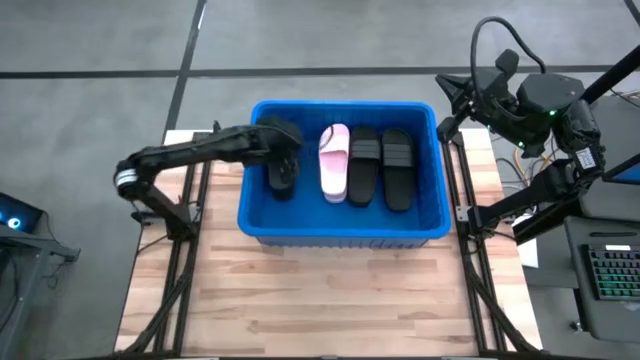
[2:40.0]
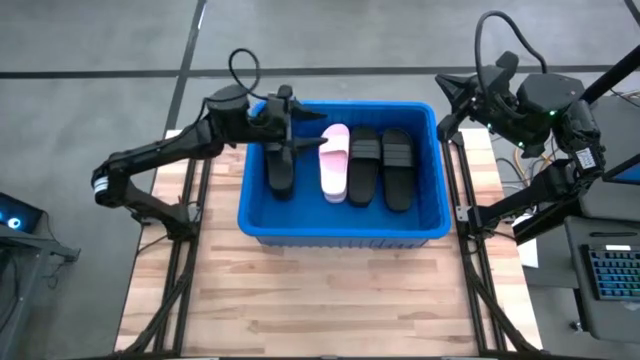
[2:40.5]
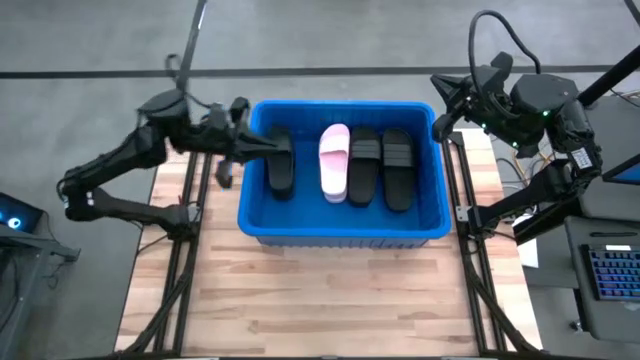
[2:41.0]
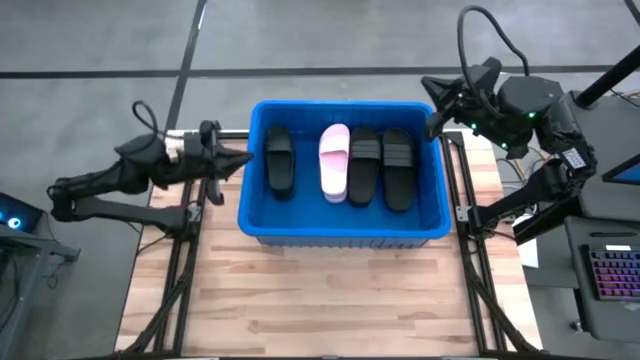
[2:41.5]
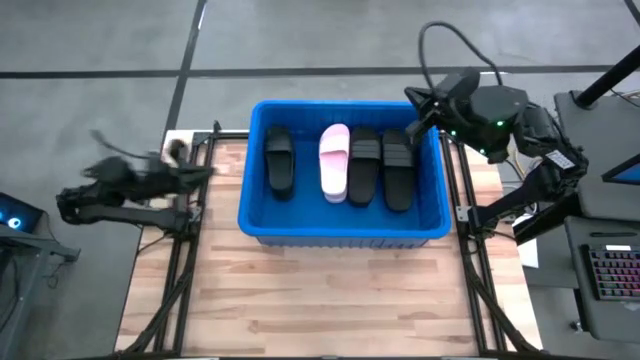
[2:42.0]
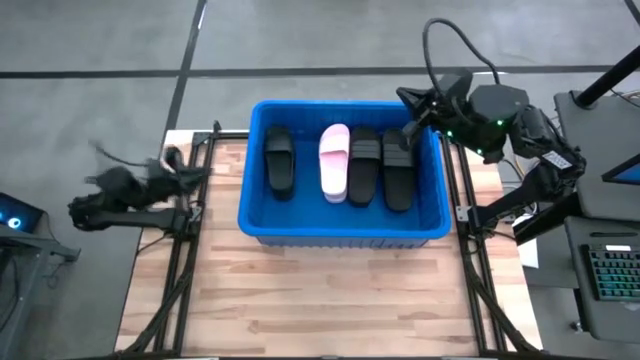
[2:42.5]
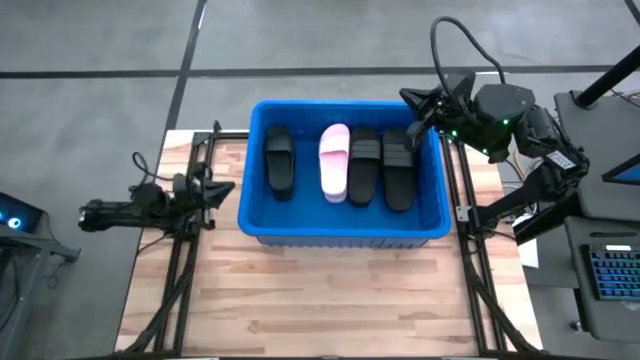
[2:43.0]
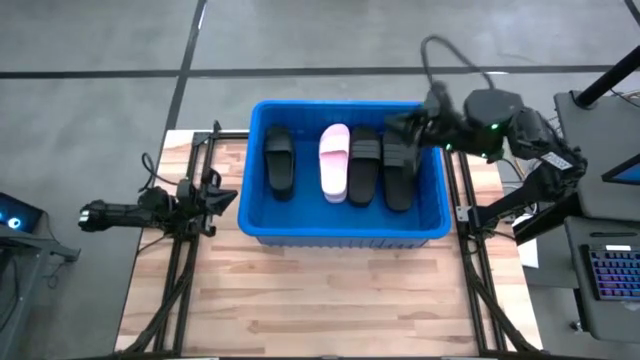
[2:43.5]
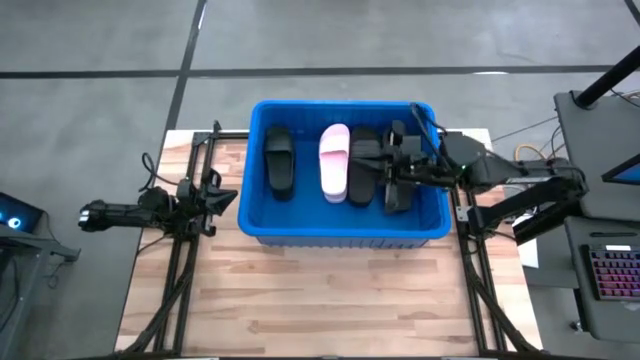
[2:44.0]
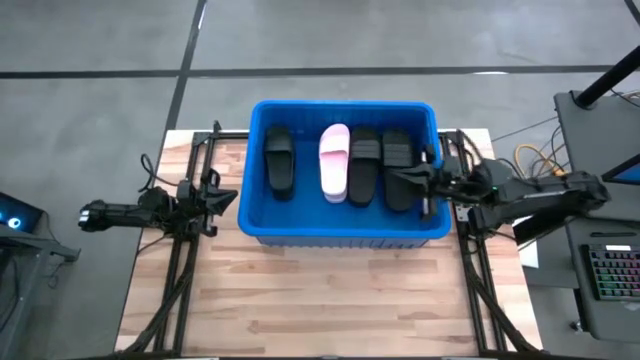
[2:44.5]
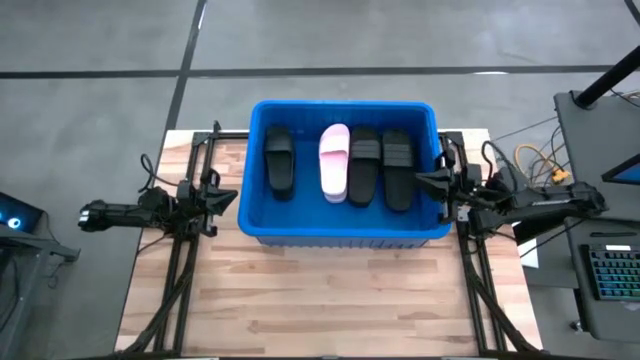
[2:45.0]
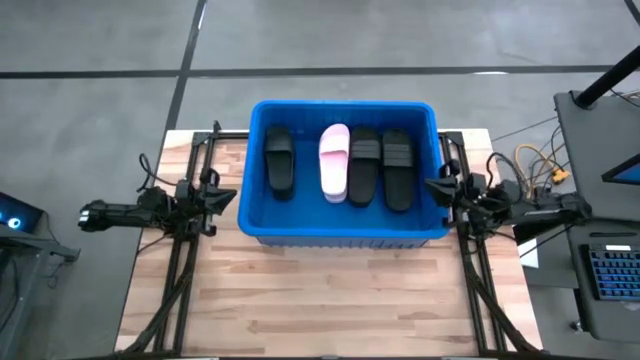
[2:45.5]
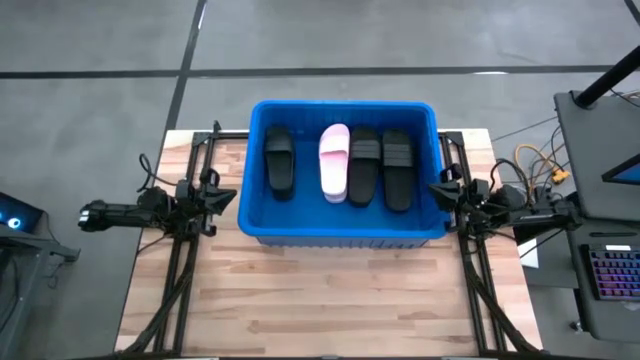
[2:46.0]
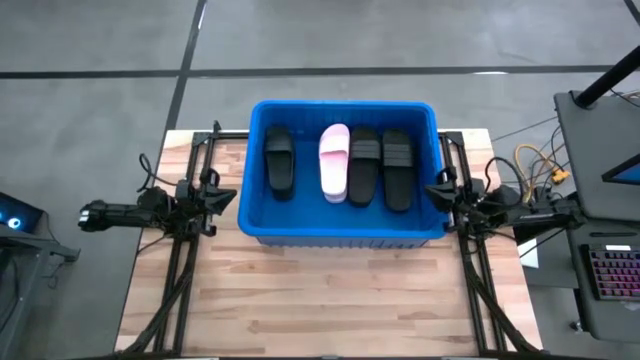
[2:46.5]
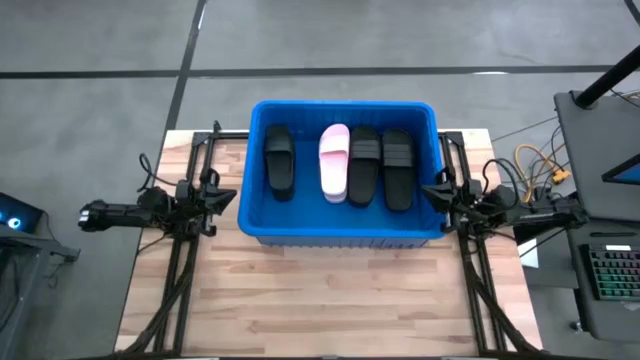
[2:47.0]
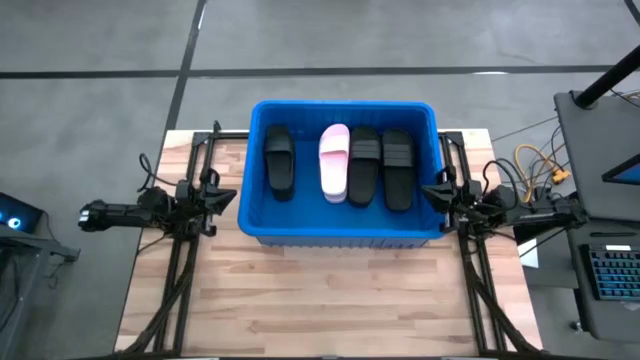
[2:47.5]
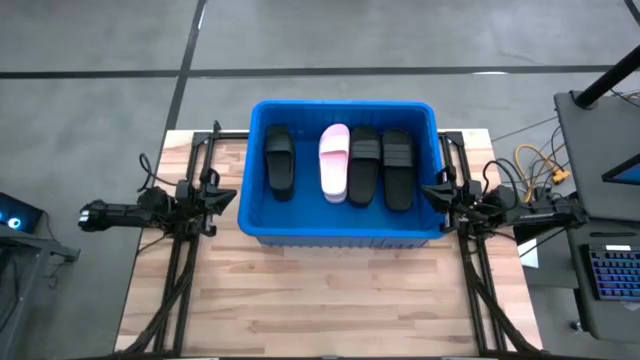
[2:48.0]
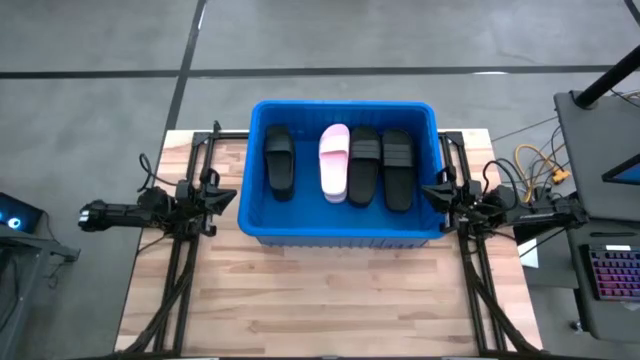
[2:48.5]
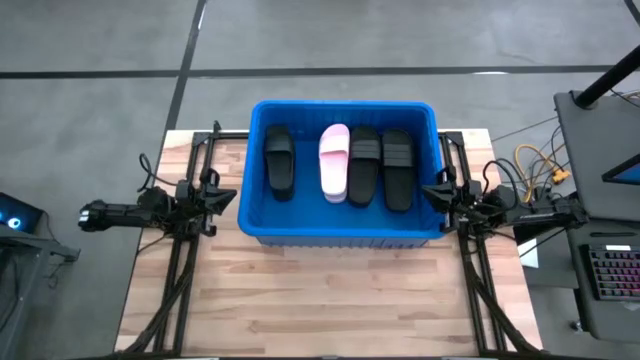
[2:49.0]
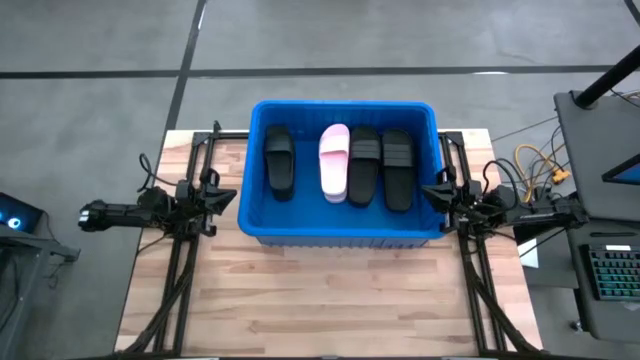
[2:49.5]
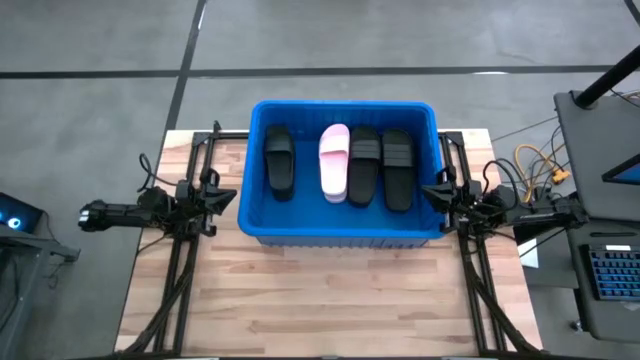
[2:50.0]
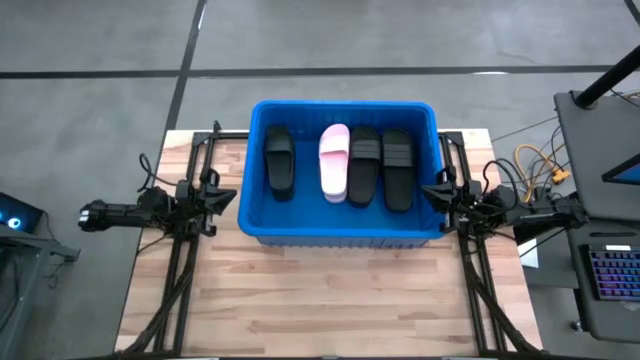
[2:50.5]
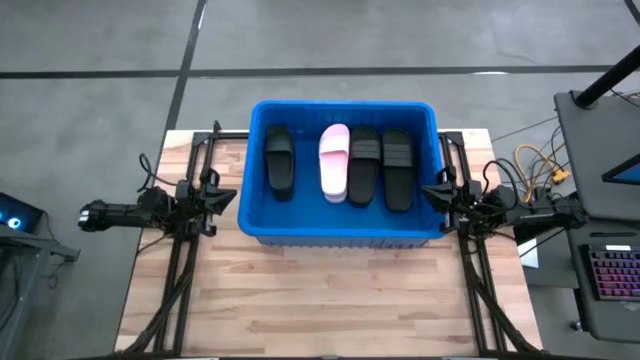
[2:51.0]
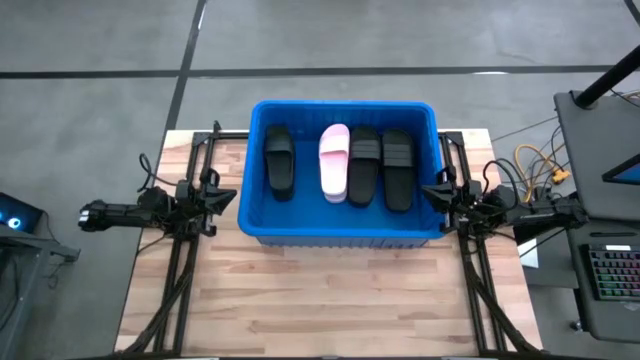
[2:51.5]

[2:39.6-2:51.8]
Task: Pick and place slides into bin
Return to Home Position

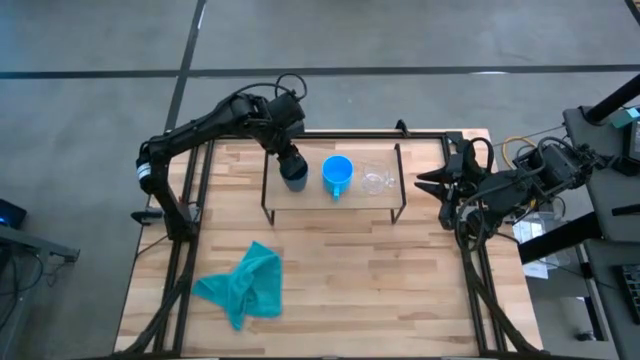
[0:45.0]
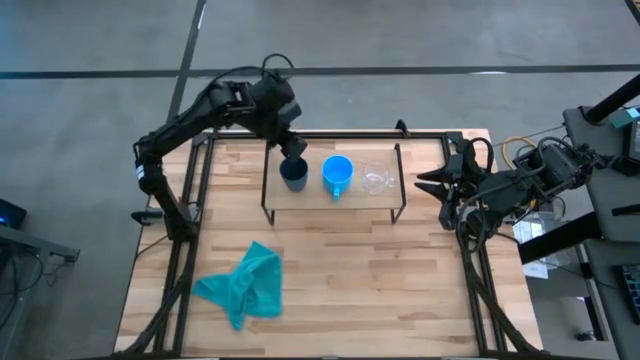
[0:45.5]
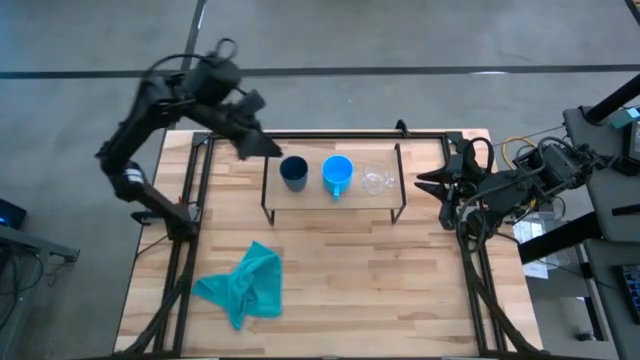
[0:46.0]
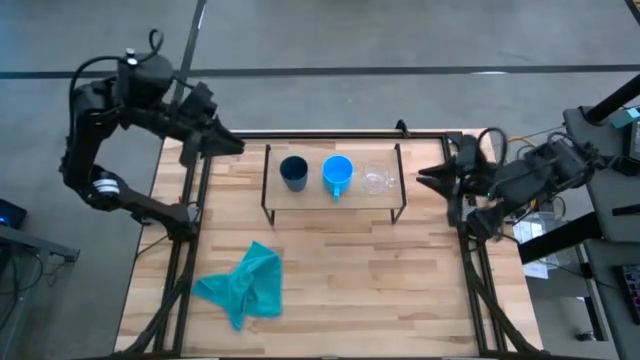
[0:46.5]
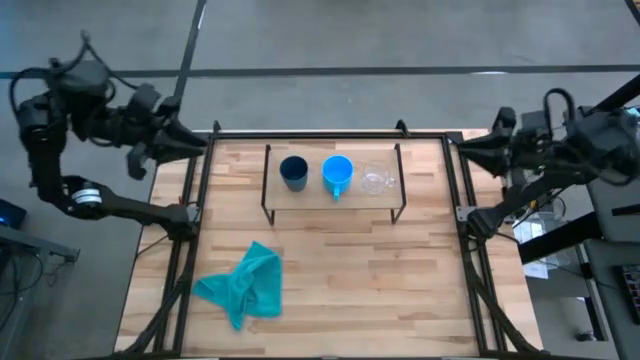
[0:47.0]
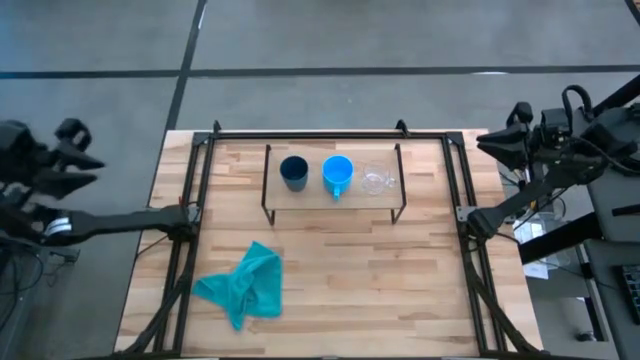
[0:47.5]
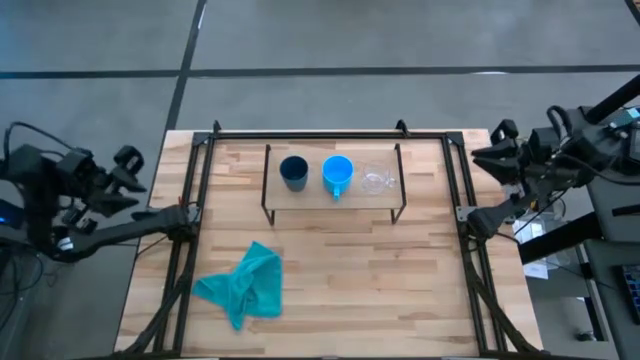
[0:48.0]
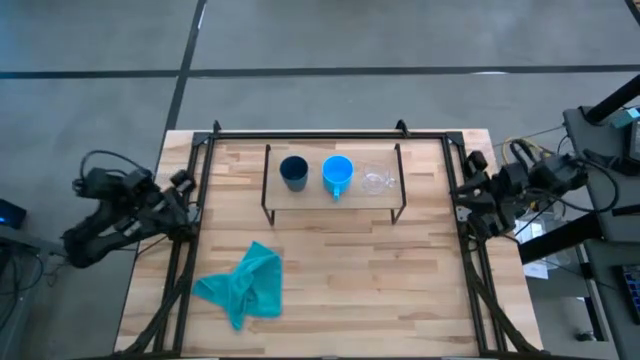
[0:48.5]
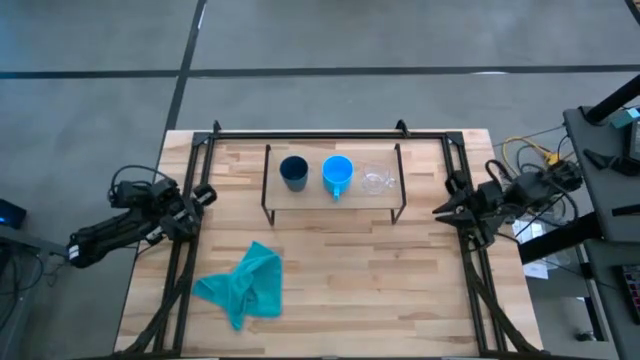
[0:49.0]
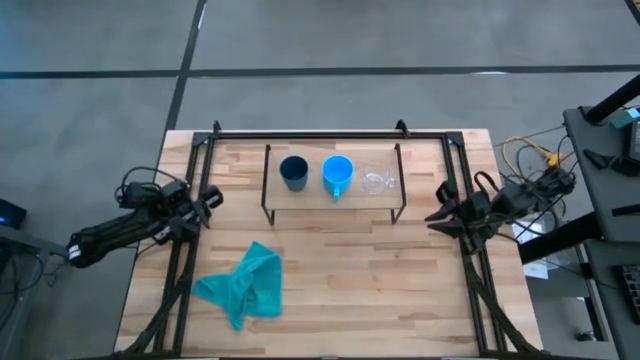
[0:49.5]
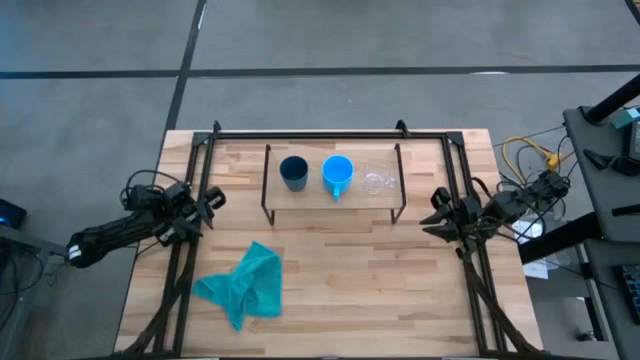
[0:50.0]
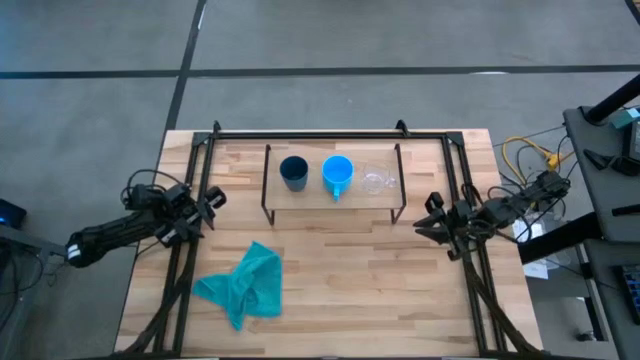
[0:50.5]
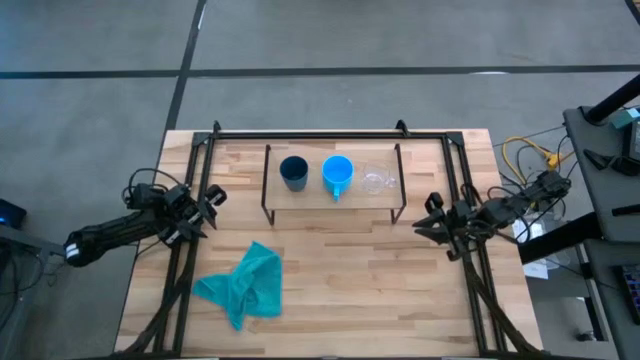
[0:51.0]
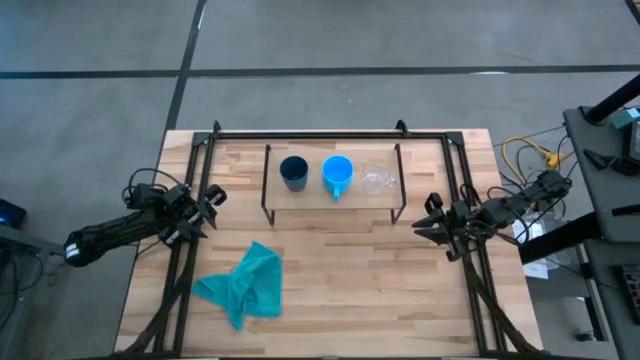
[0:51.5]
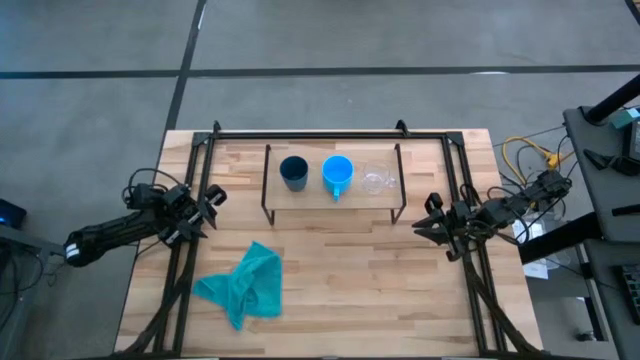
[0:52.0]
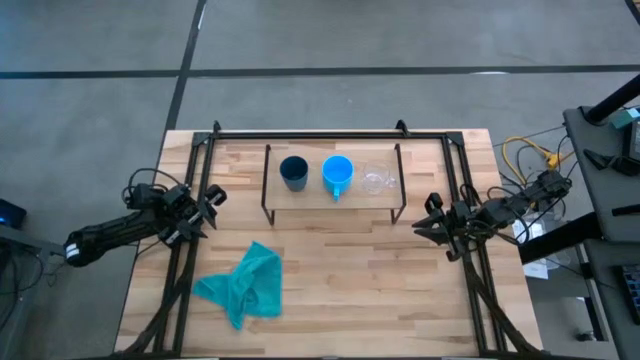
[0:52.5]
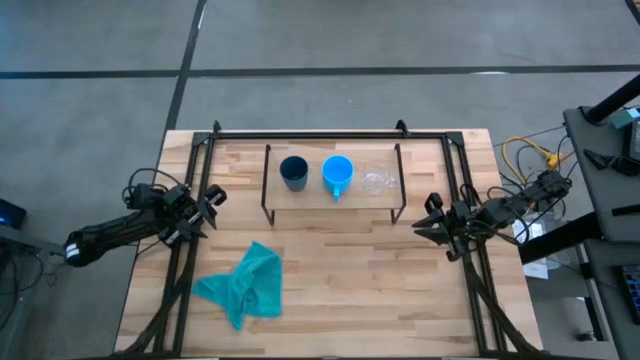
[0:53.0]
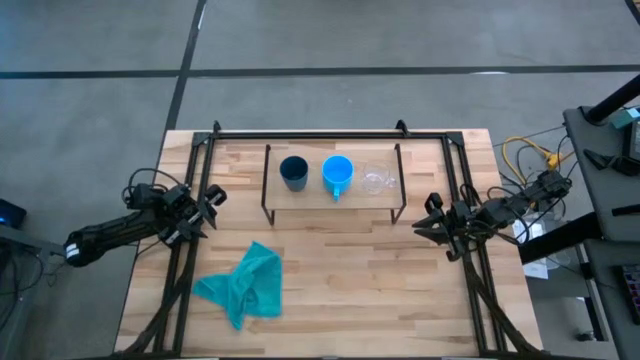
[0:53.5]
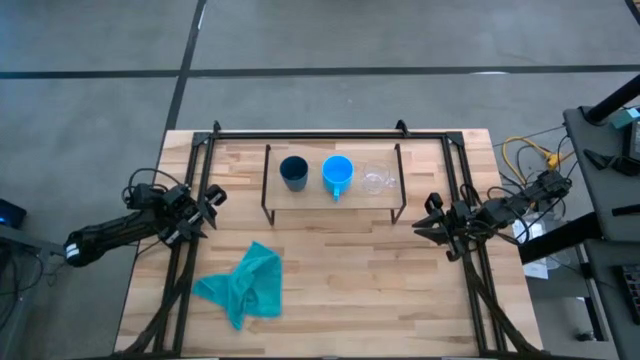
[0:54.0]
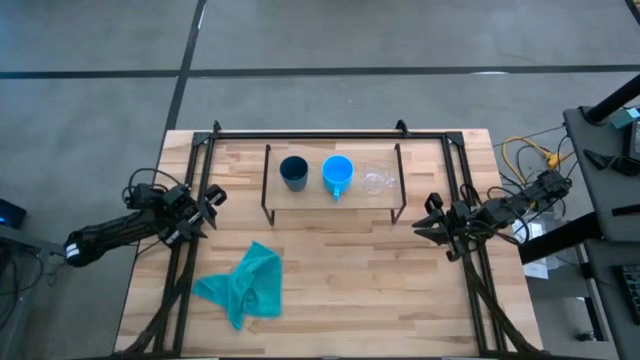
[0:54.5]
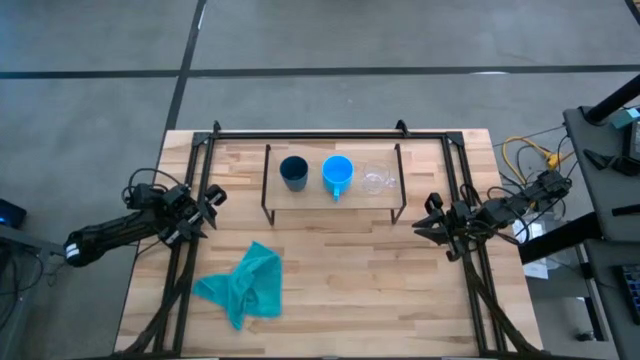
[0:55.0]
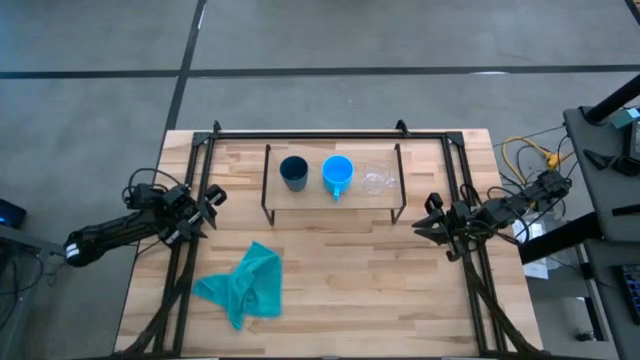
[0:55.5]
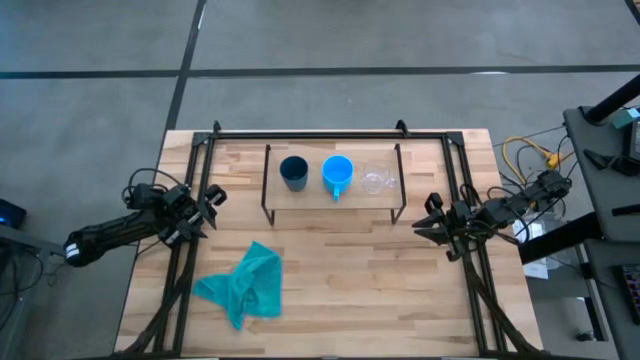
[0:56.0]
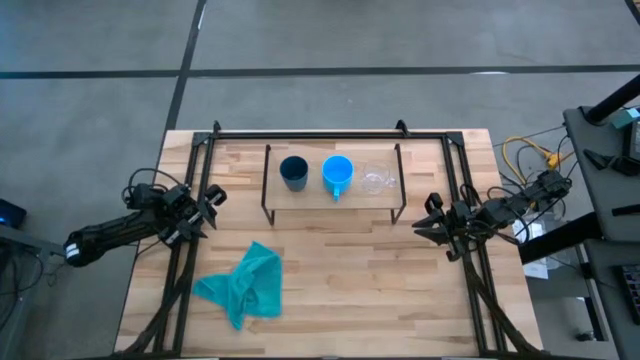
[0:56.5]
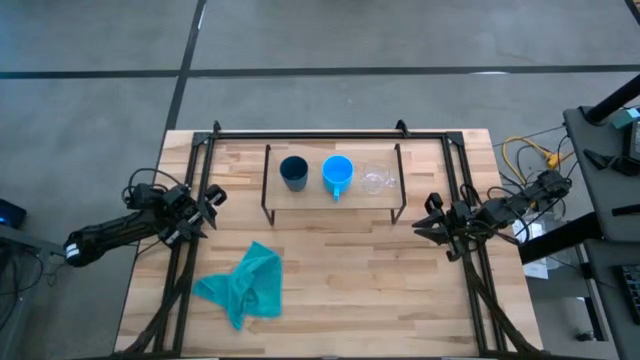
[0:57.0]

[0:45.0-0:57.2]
Task: Stack small to large cups/mugs on shelf
Return to Home Position
